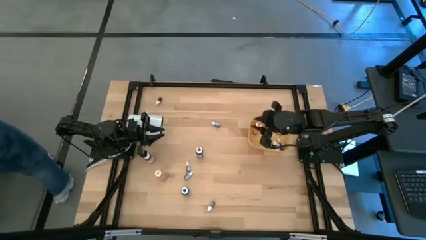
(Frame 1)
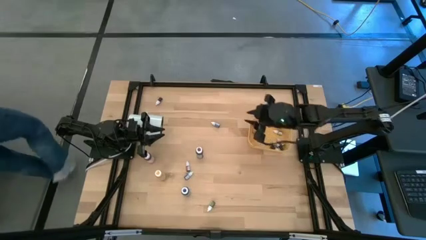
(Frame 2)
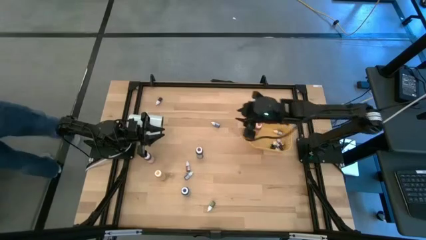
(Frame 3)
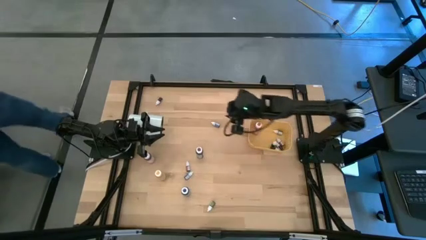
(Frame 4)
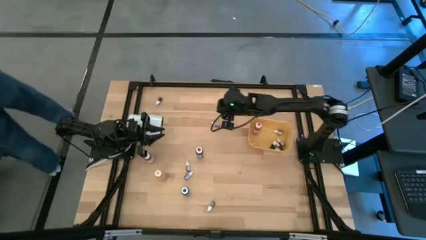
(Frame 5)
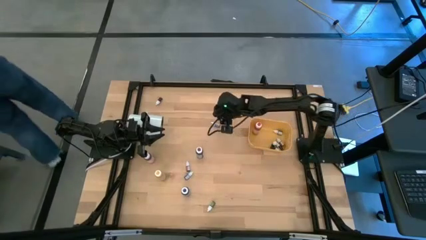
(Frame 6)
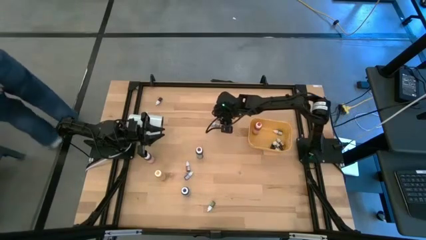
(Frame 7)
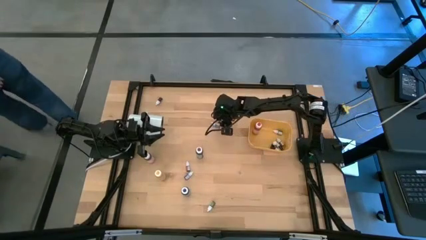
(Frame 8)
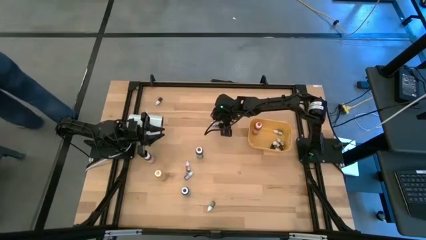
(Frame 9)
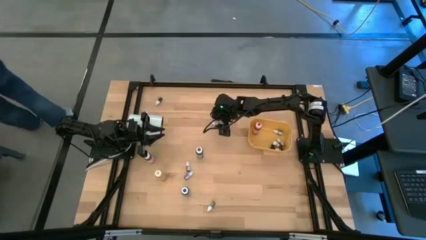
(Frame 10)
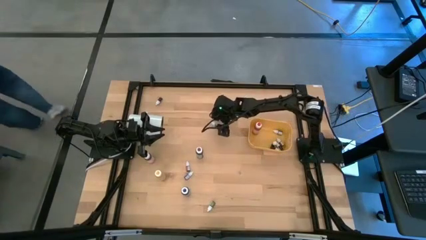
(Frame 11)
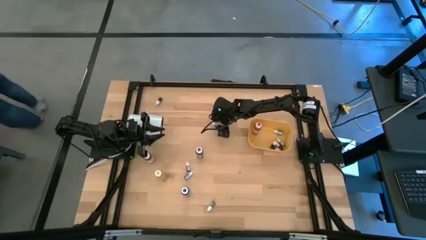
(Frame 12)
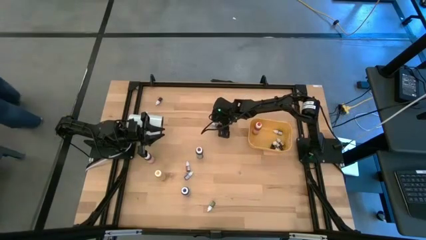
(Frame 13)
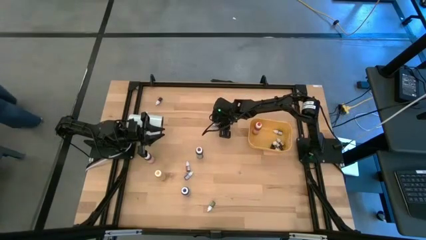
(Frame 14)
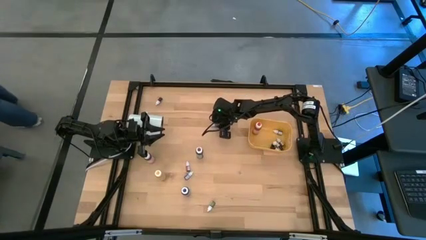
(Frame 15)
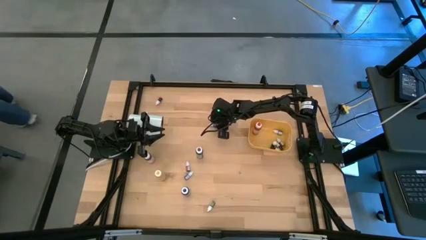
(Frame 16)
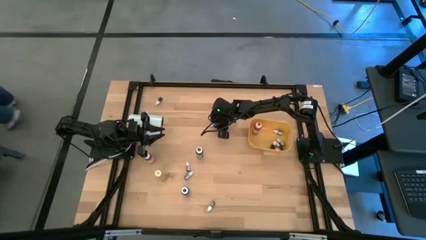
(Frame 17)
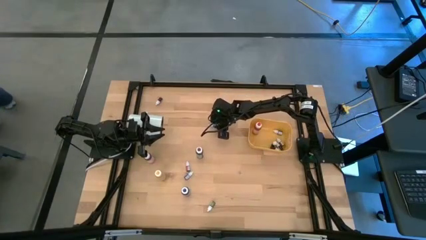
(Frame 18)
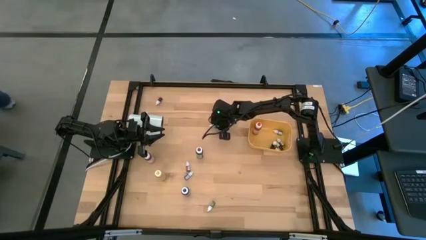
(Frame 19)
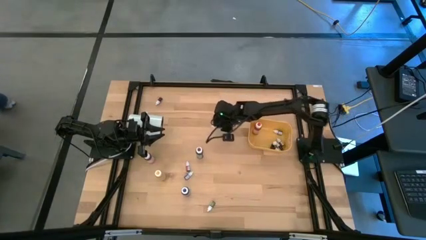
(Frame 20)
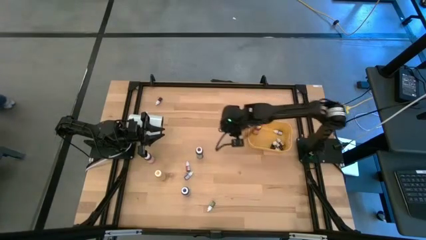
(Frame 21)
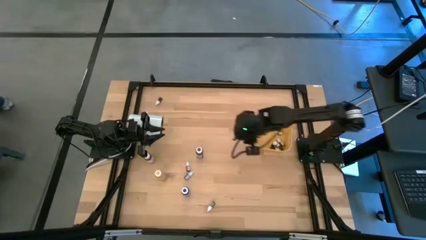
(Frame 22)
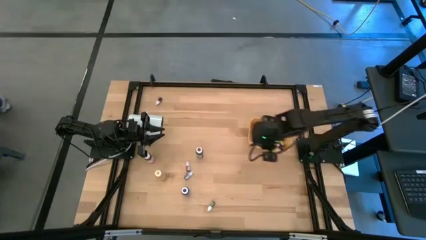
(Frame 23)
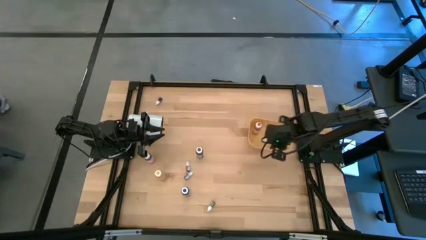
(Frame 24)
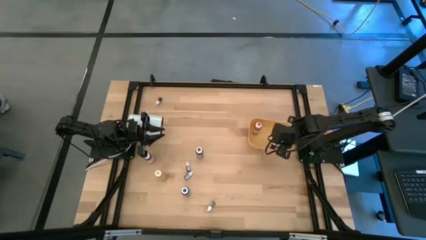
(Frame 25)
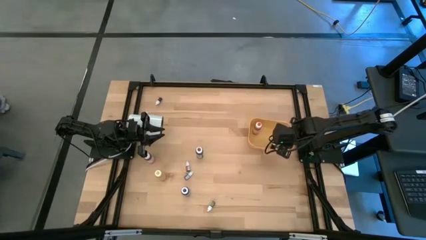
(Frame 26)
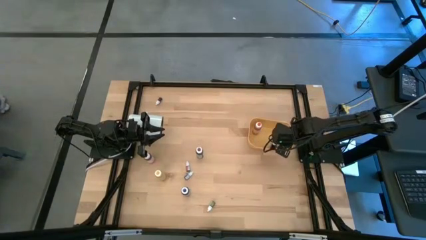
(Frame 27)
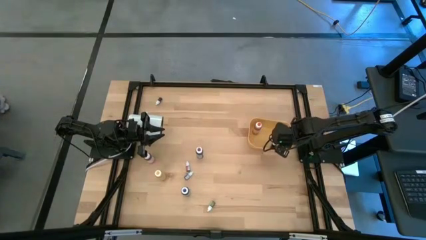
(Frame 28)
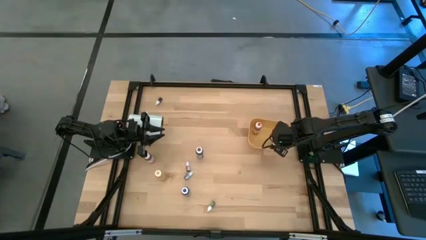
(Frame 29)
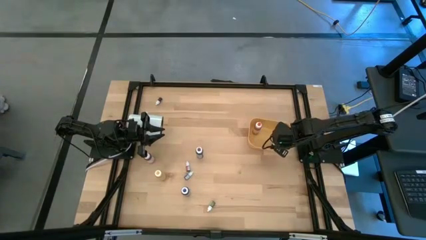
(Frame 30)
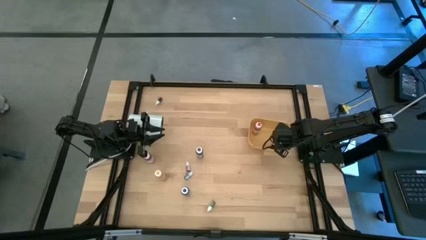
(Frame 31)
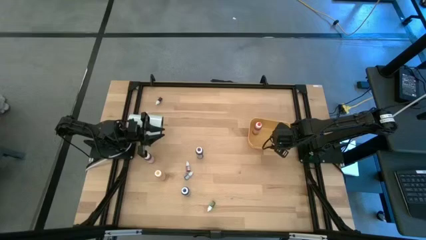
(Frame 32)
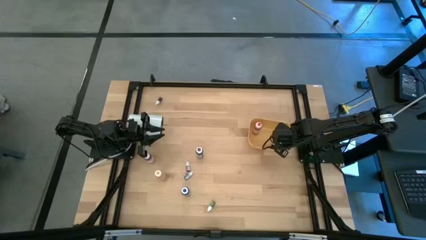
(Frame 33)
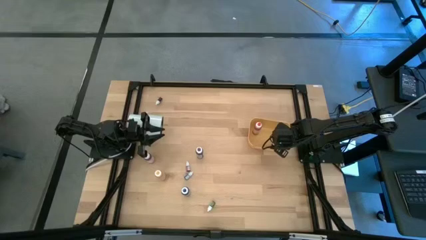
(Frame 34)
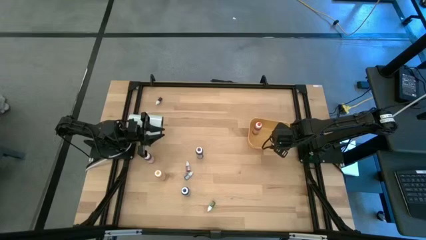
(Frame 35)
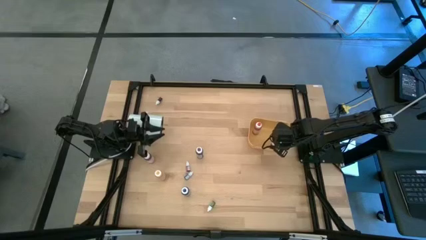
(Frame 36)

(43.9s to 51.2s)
Task: Pick & Place food coloring
Put the blue food coloring bottle into the yellow bin

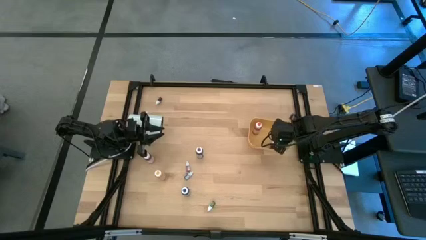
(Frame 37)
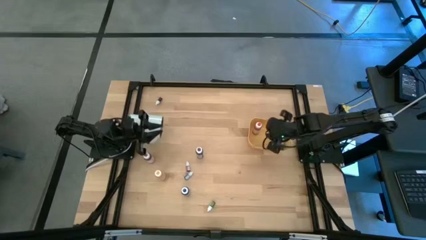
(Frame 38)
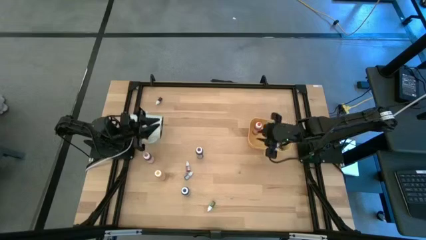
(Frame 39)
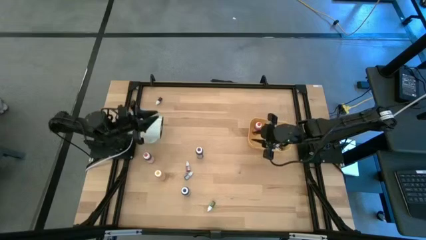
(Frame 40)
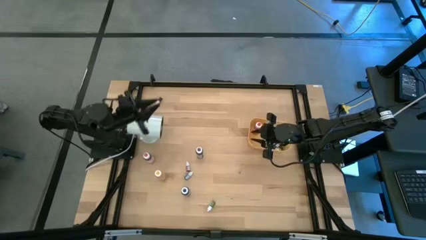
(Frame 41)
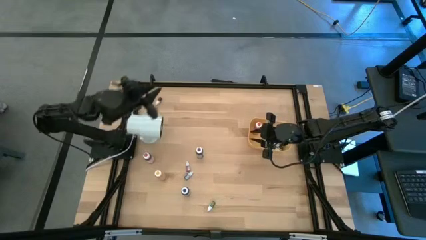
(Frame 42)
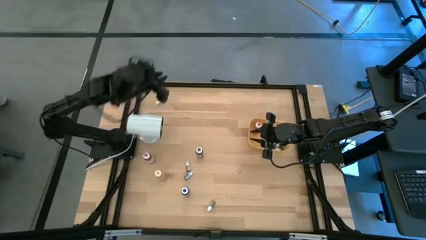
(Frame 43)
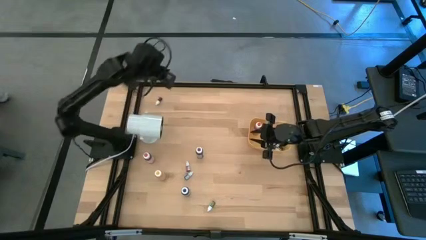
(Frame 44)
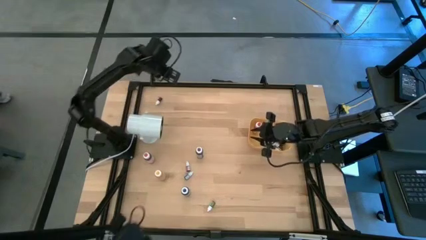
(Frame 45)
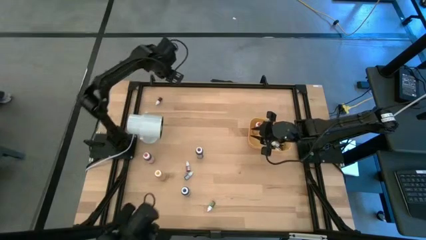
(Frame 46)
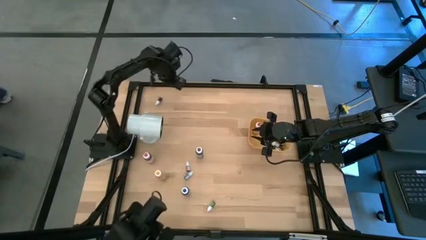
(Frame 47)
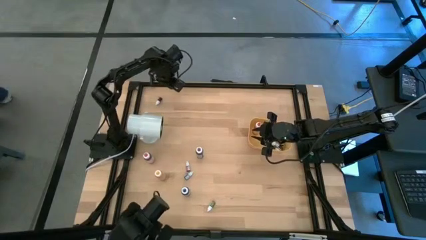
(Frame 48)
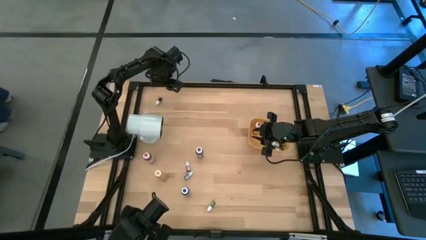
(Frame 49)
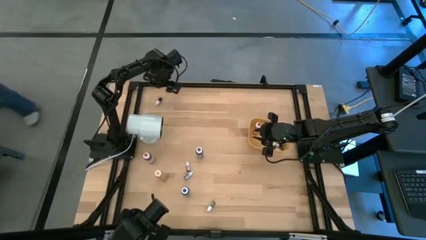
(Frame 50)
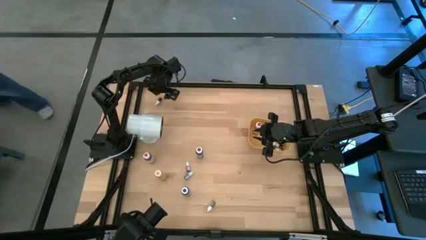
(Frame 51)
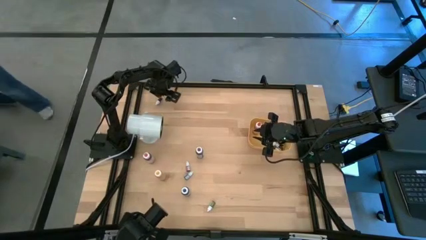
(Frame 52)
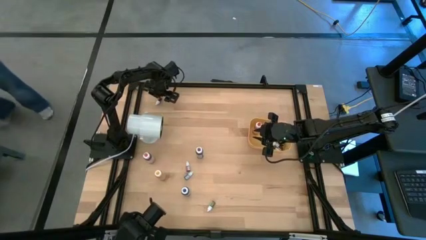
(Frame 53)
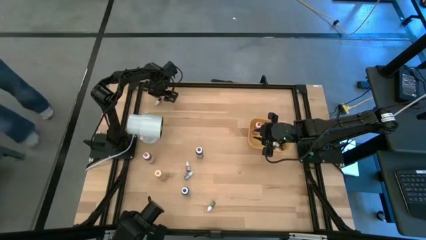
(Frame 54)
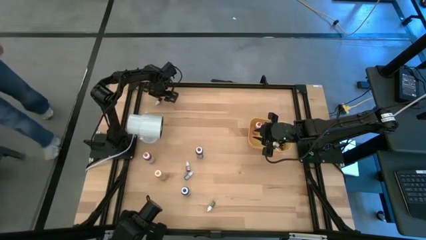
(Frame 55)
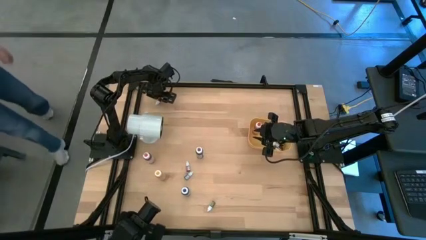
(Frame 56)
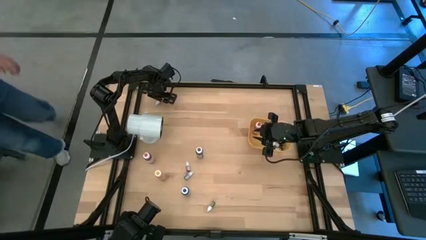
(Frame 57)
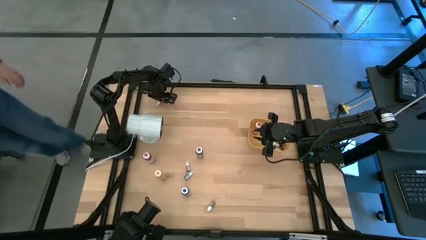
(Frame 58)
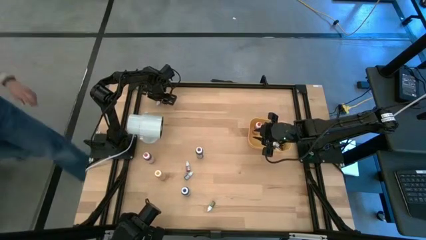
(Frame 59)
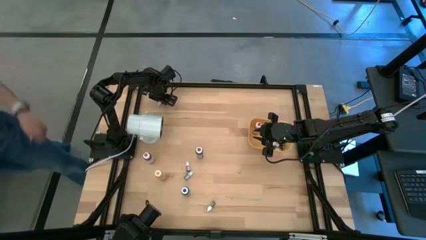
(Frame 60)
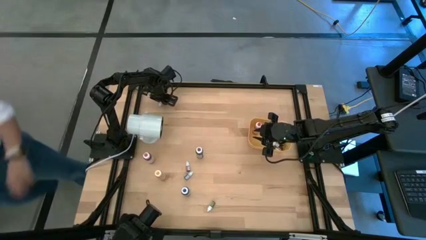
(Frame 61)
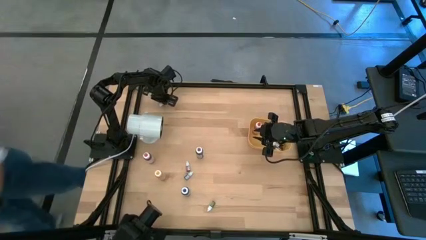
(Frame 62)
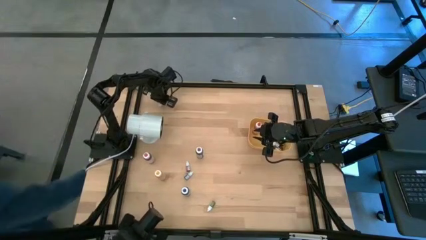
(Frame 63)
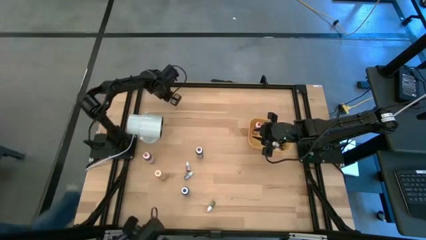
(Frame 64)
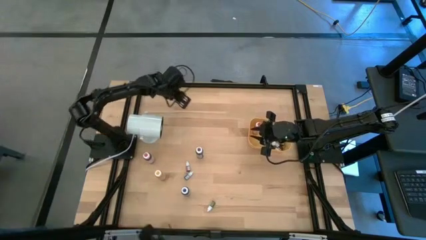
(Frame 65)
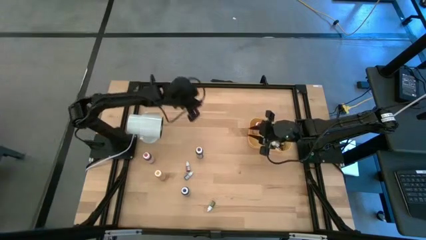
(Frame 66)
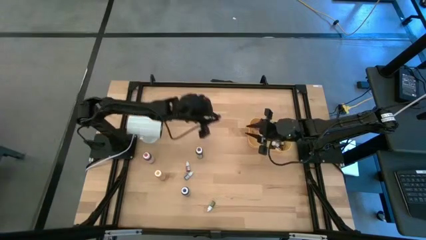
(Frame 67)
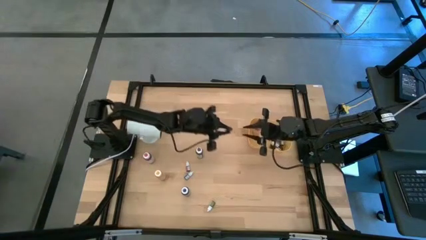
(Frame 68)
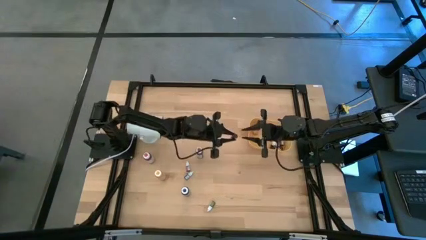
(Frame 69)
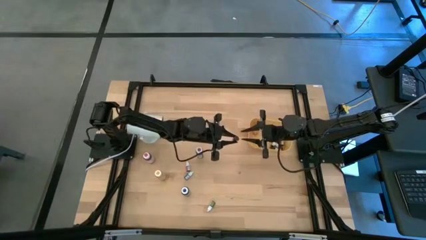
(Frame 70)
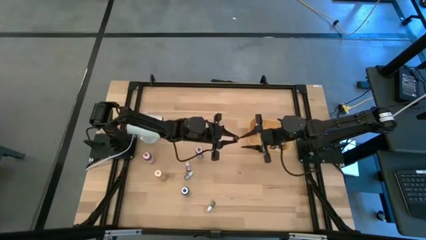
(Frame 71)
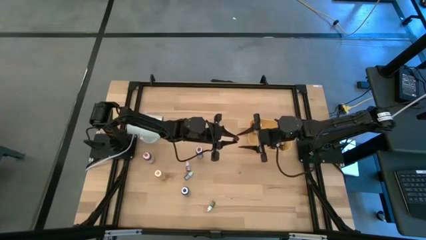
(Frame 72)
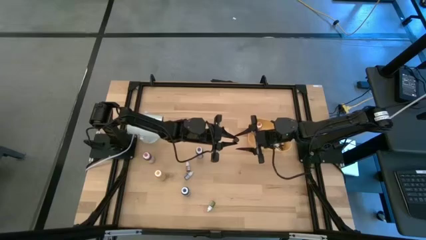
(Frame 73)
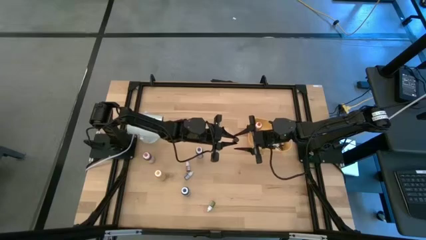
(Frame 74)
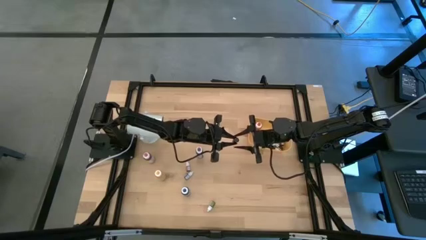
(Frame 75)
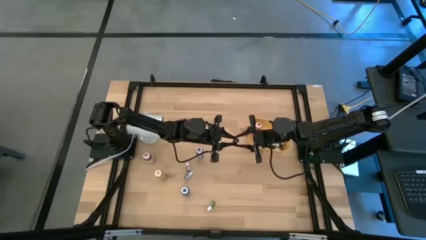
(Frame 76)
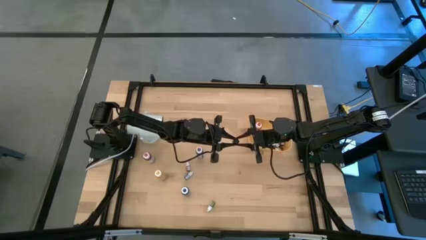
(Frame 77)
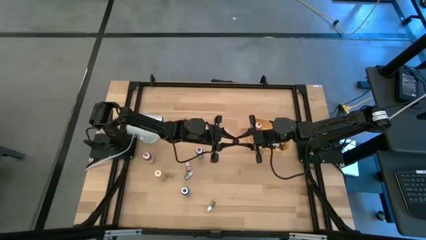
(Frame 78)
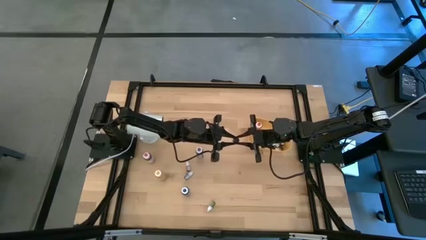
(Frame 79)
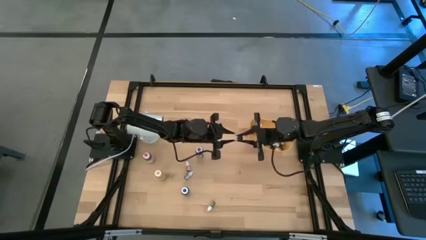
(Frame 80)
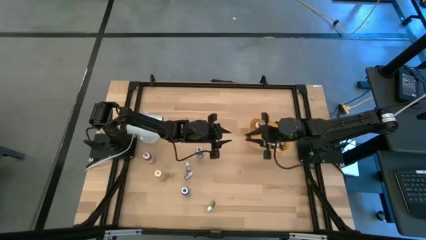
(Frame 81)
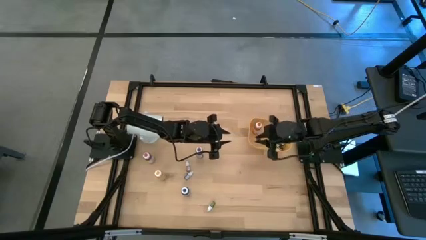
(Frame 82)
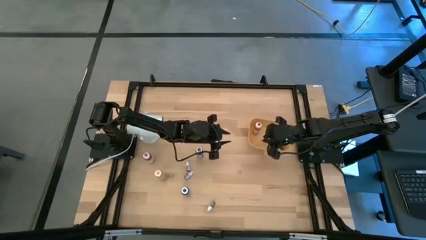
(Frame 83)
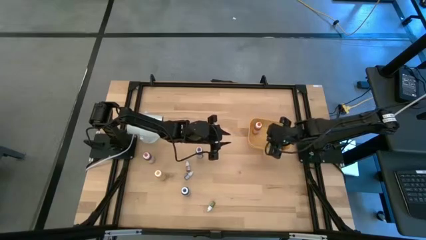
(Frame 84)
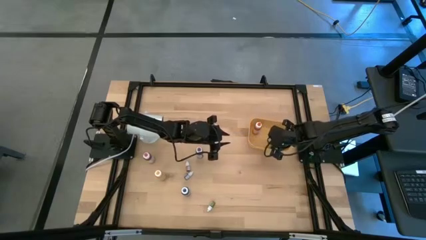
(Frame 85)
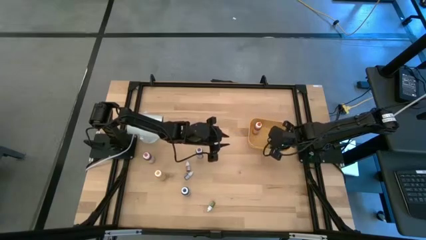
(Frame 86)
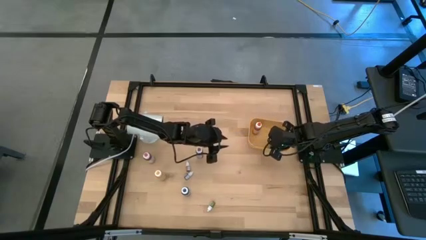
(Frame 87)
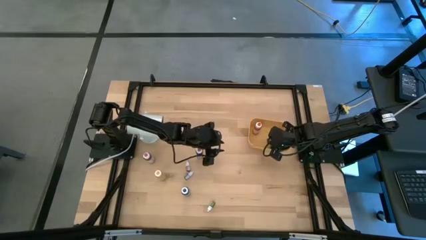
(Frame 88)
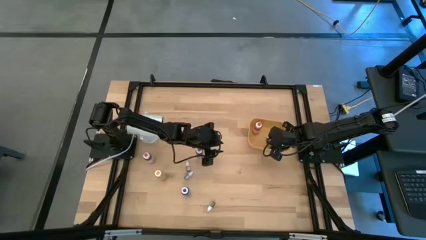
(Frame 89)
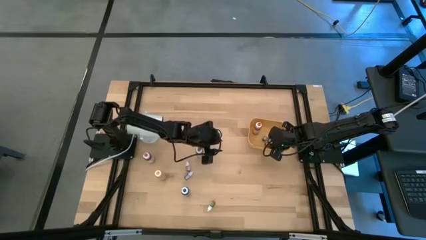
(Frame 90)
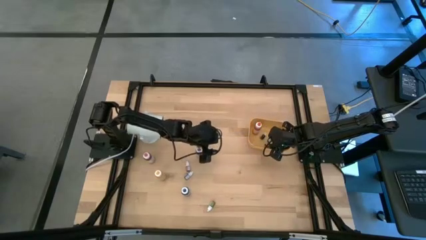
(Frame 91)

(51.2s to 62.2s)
Put the pink food coloring bottle into the yellow bin
